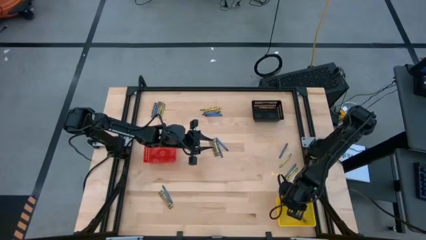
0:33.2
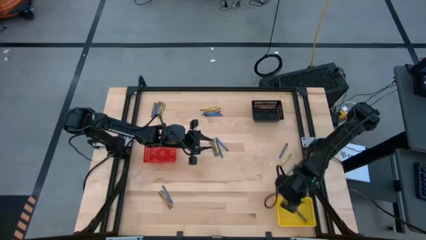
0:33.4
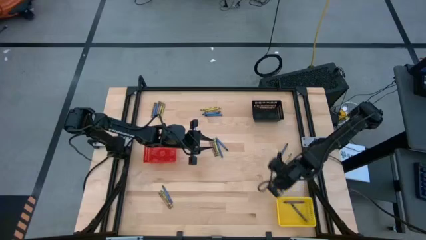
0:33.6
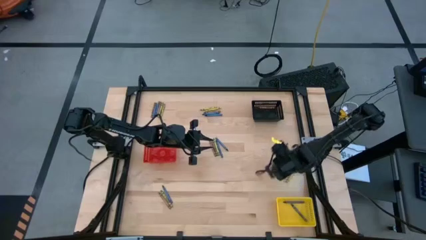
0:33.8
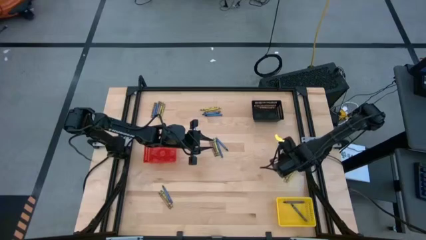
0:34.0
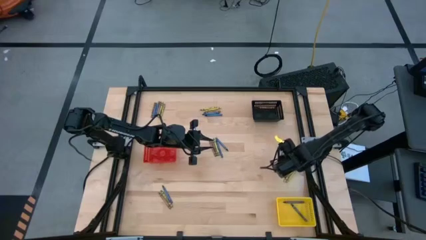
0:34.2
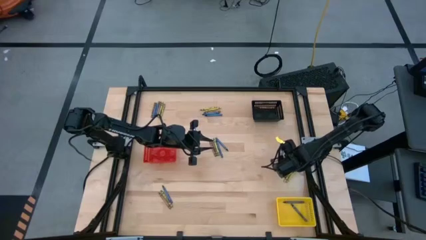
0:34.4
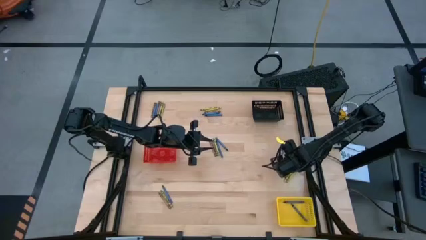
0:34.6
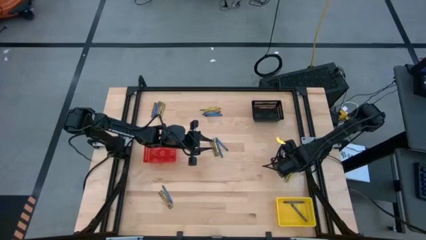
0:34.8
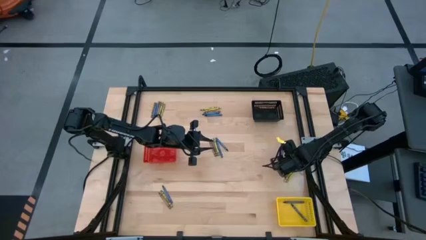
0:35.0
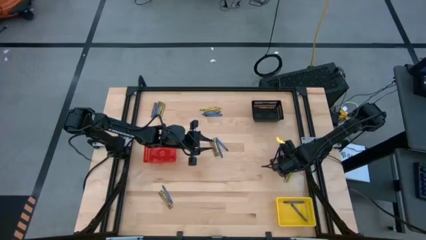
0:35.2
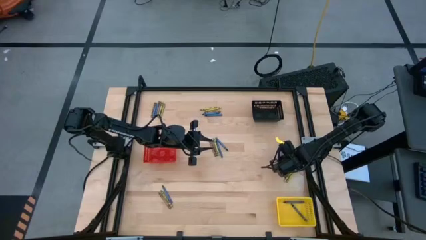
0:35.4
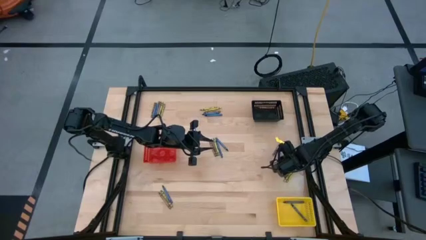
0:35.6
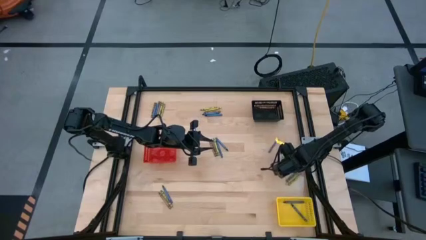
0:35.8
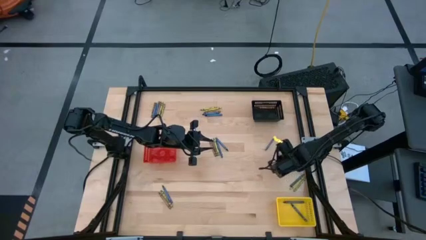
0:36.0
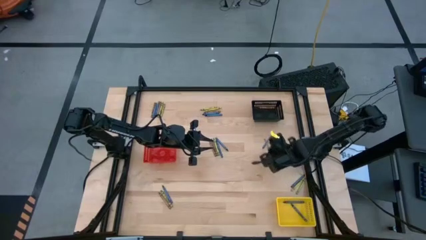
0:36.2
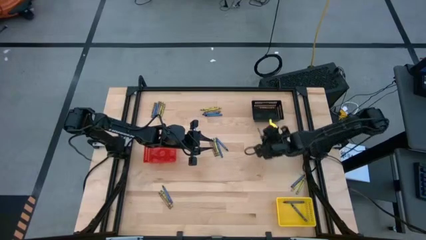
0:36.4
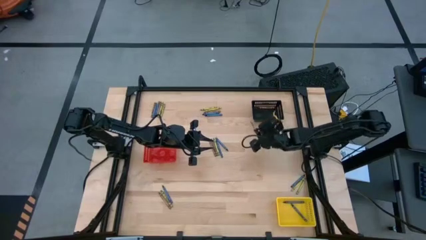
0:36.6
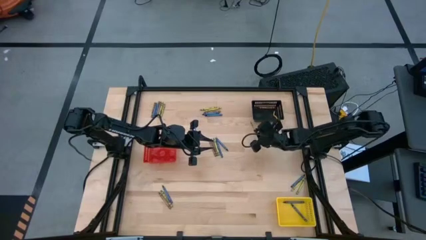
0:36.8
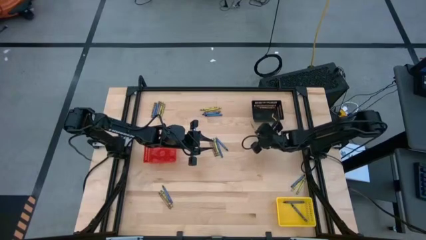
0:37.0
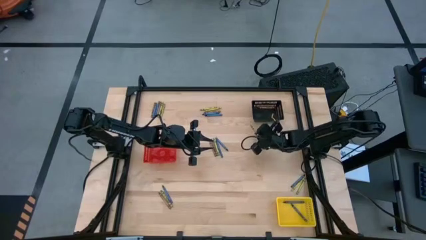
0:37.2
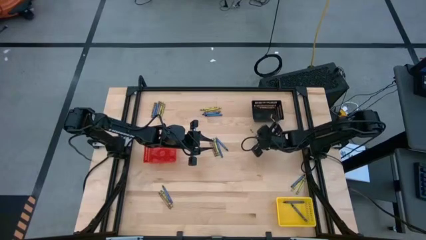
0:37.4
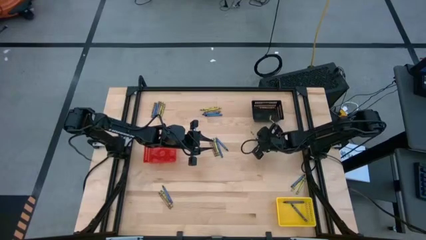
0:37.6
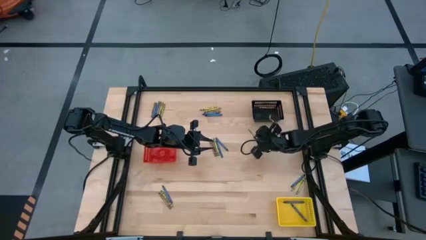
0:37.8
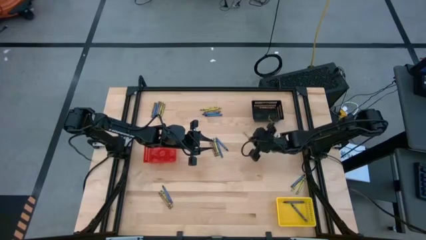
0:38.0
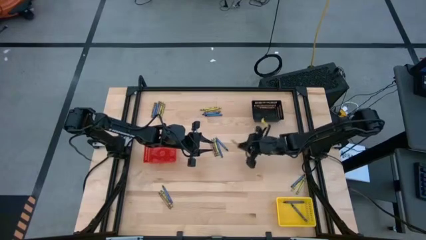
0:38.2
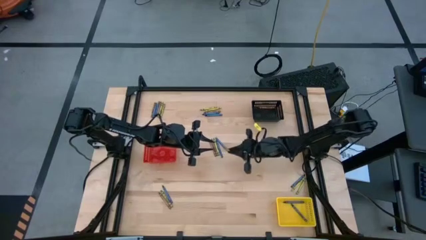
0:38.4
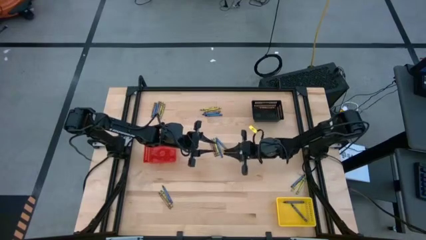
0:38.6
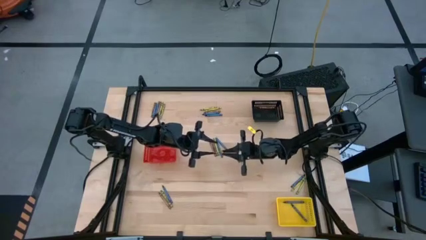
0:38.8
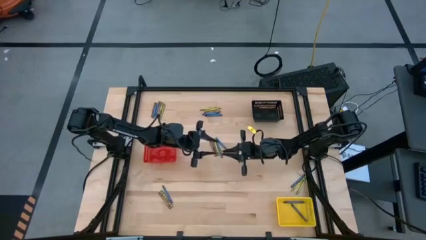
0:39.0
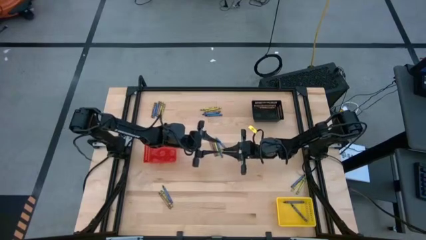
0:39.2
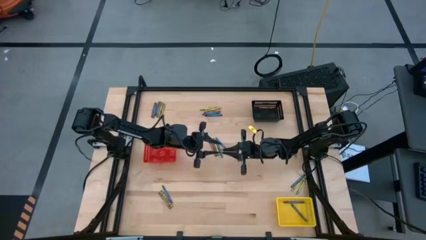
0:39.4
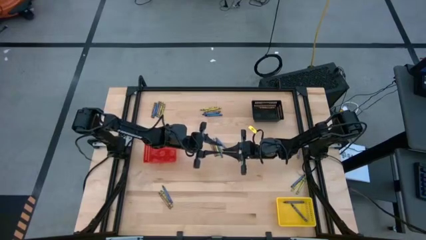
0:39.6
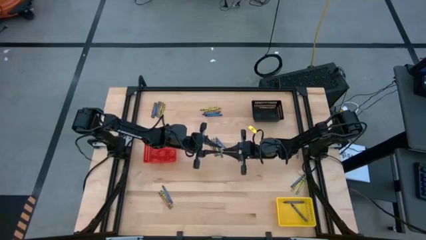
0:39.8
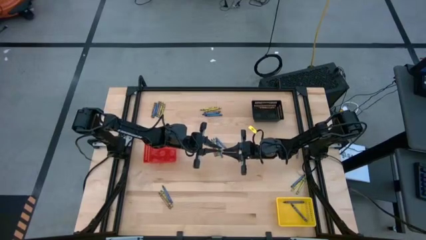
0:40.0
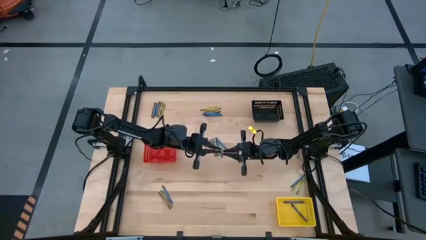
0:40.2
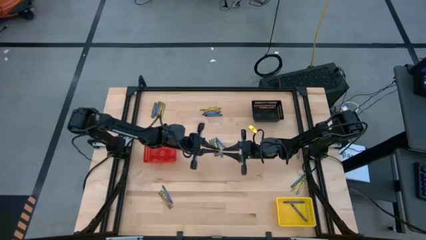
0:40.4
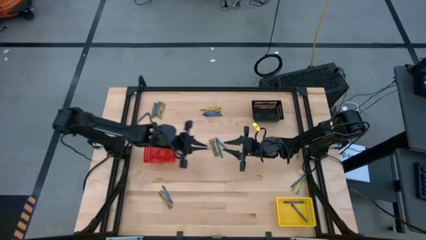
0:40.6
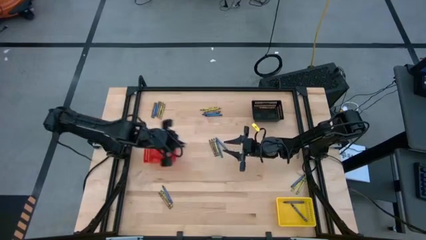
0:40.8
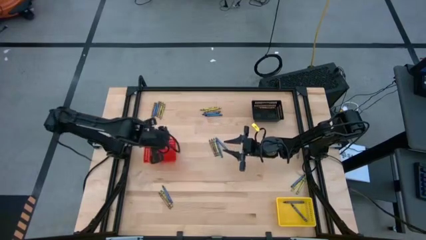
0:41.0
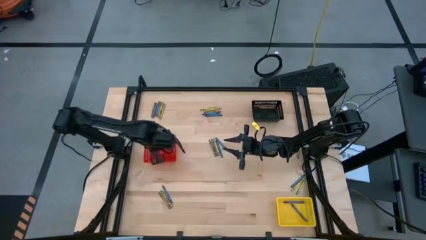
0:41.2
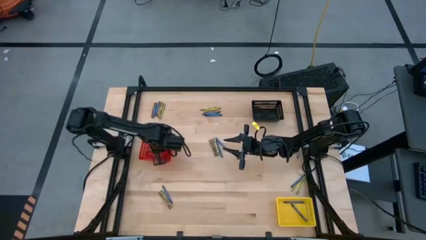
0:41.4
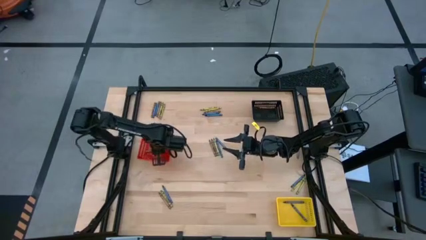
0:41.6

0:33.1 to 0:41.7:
Task: Sort crayons
Put the green crayon into the red bin

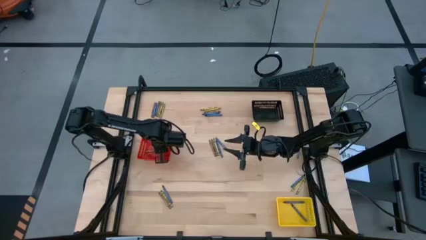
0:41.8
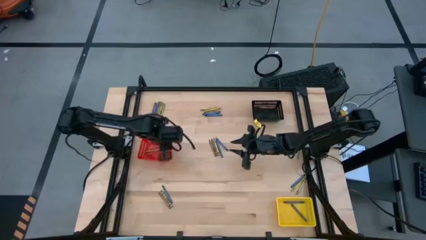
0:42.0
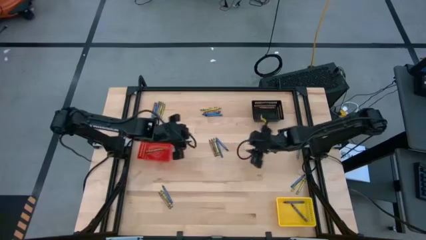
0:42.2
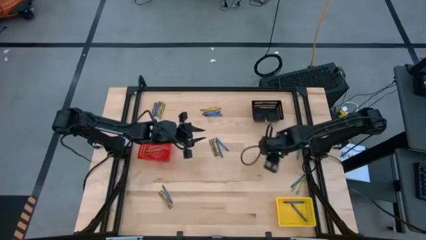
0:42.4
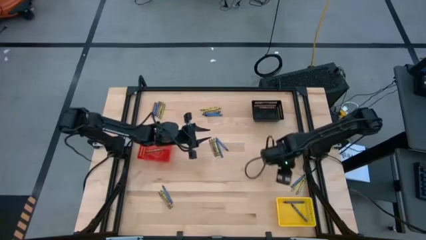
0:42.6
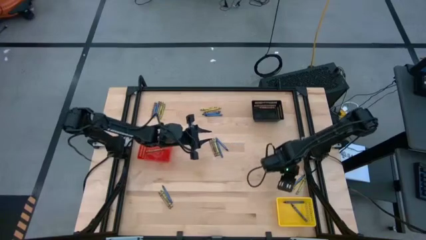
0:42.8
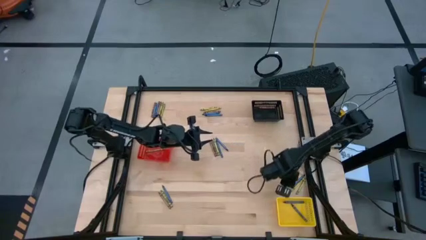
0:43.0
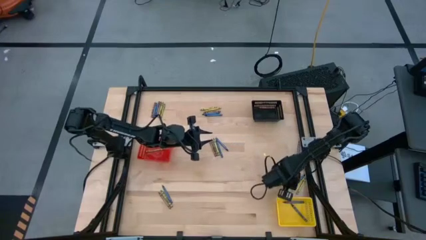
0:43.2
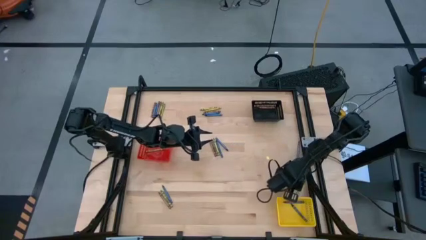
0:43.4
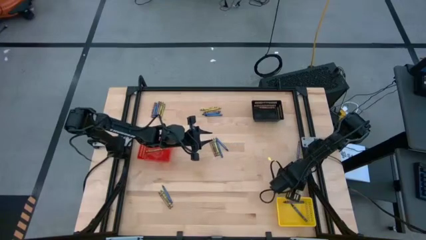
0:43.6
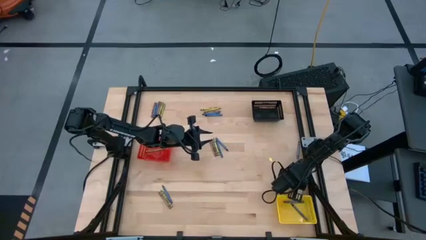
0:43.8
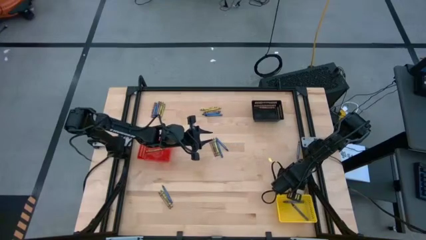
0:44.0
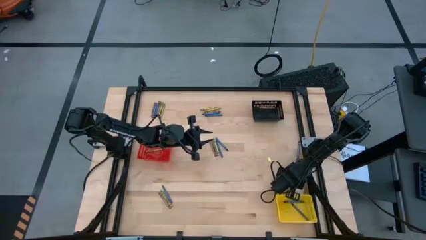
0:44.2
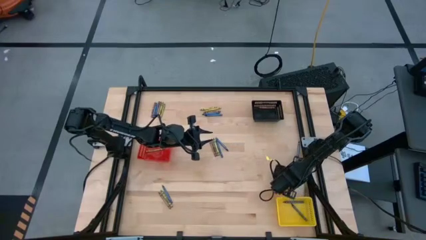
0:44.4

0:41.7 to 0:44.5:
Adjust the crayons on the table

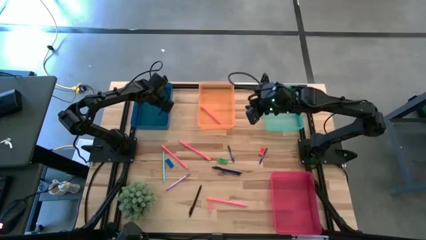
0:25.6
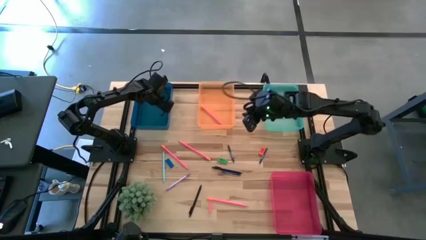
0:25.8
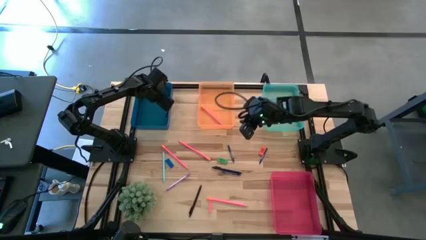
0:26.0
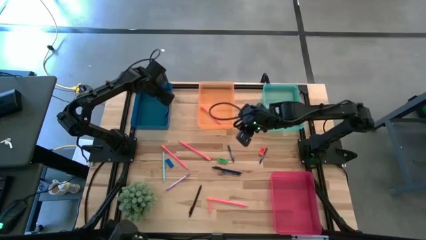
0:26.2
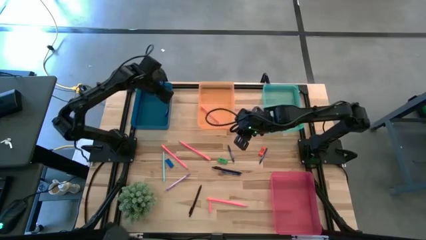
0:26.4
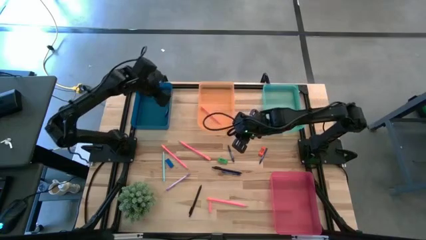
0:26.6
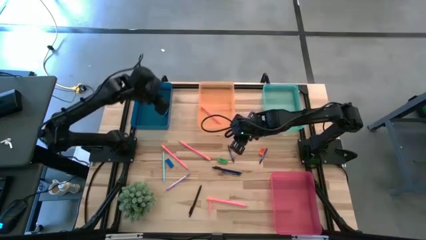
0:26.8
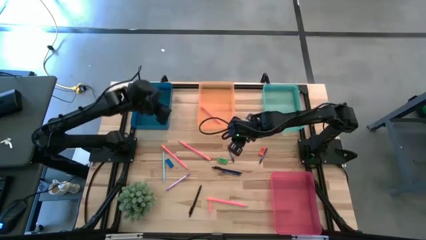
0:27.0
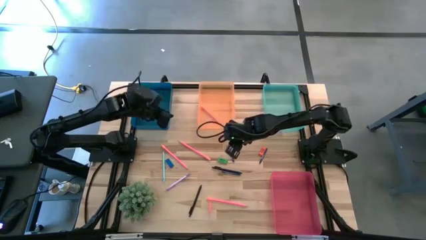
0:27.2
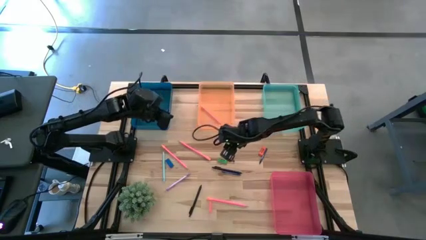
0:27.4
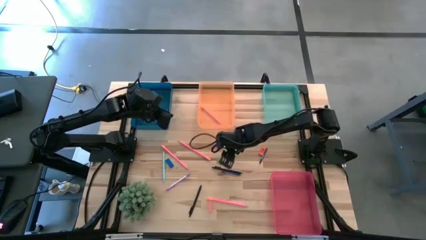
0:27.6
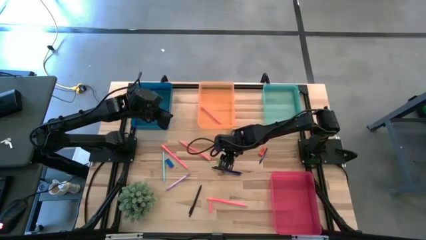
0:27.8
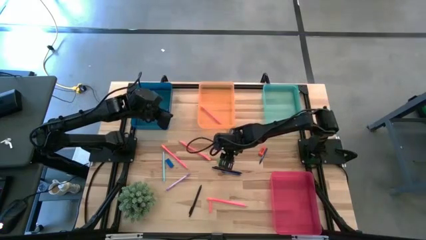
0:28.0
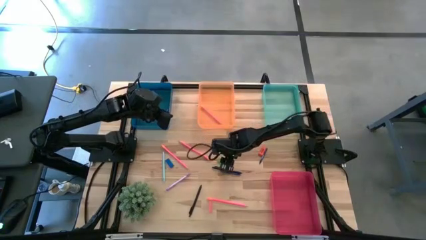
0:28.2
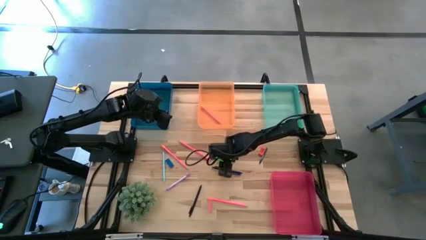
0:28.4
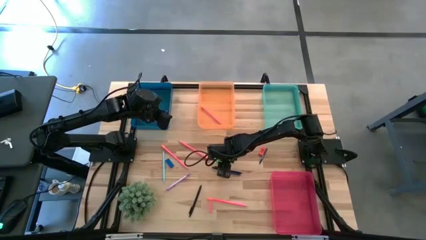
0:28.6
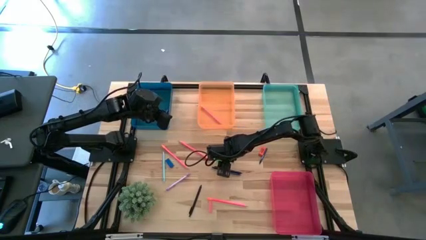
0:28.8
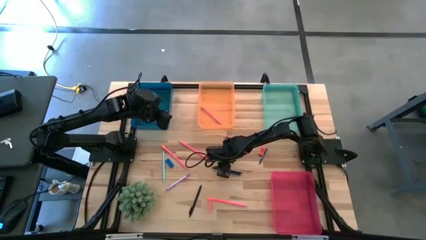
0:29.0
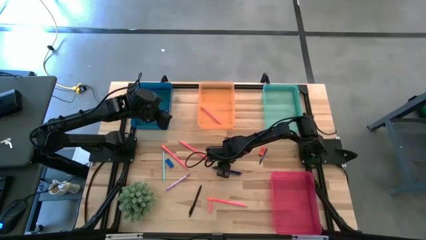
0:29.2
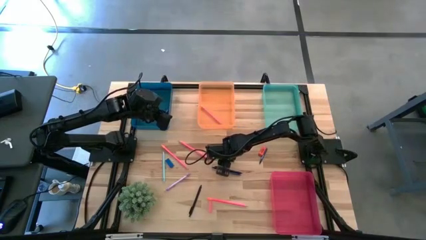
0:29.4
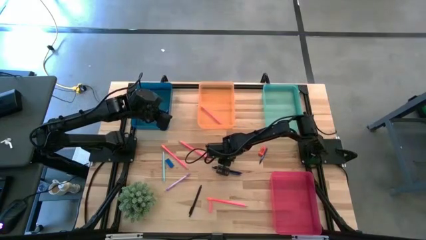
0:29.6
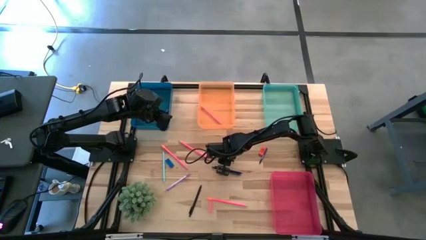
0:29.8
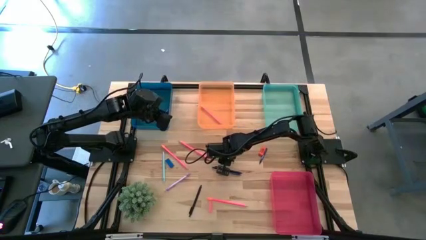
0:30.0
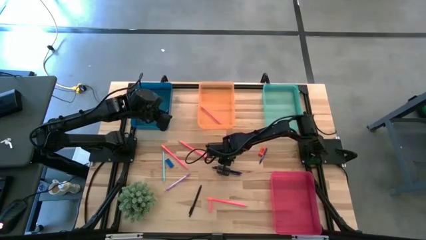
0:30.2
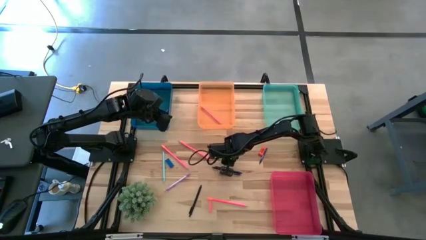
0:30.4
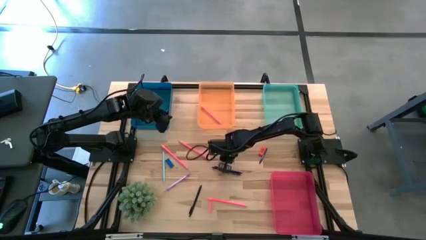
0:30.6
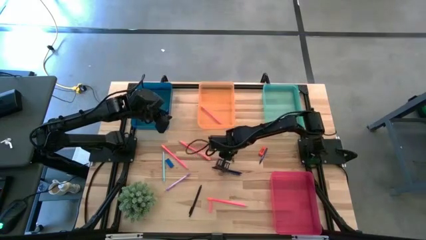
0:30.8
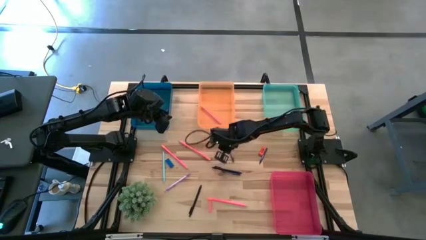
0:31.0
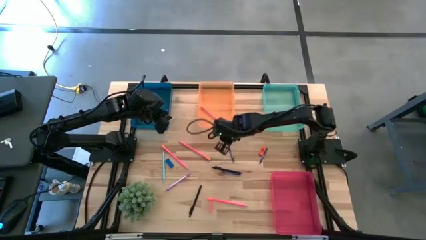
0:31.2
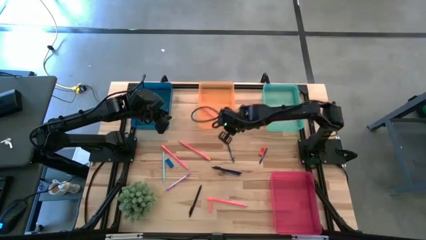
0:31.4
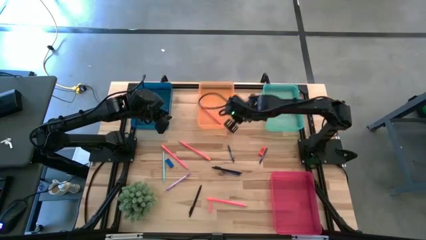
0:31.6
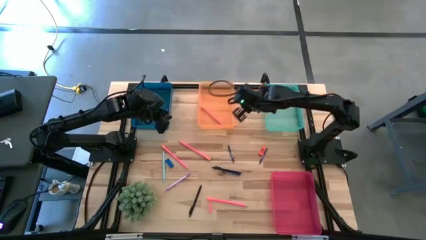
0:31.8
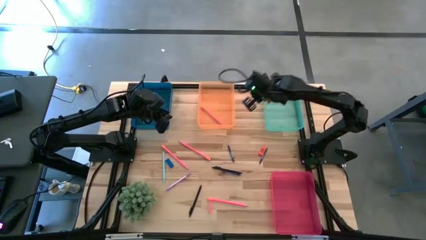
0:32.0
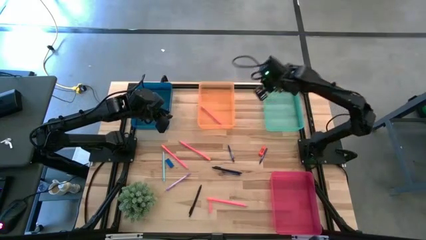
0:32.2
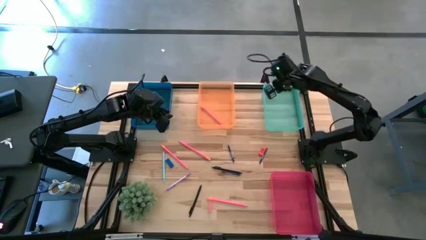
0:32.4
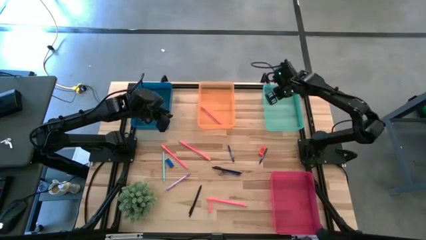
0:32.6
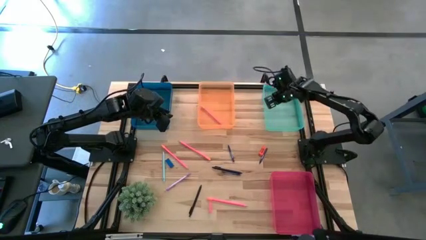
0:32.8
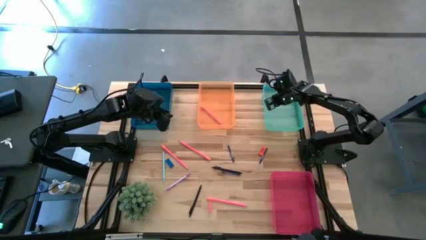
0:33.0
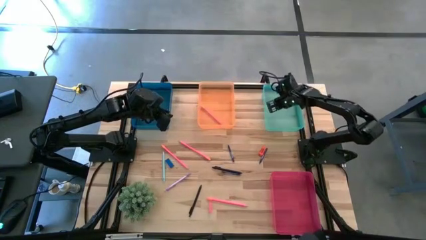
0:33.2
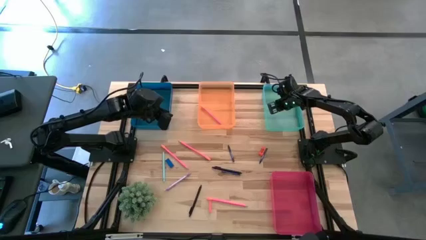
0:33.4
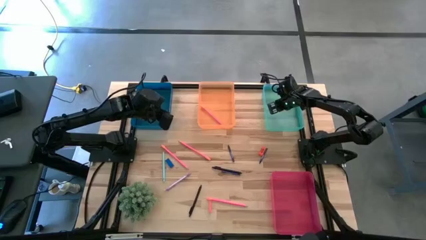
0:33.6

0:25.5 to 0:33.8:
Task: Sort crayons/erasers/pens/pencils in bins
Put the green eraser into the green bin
